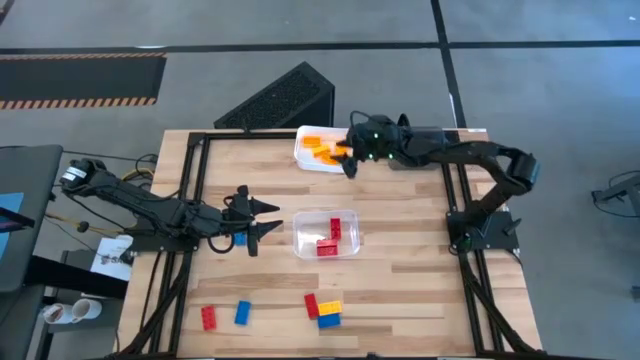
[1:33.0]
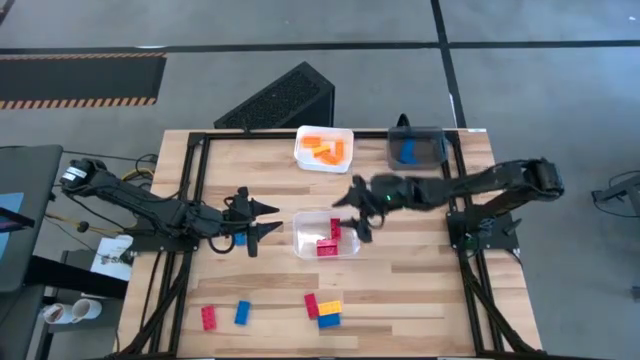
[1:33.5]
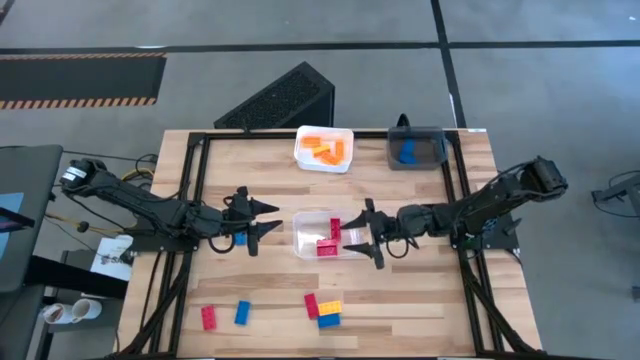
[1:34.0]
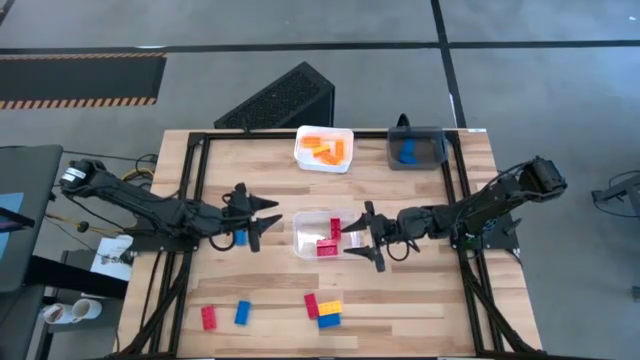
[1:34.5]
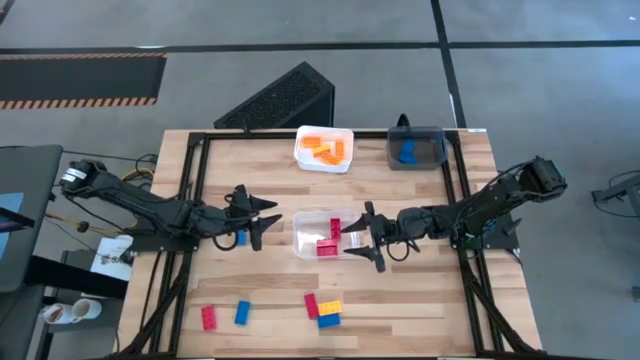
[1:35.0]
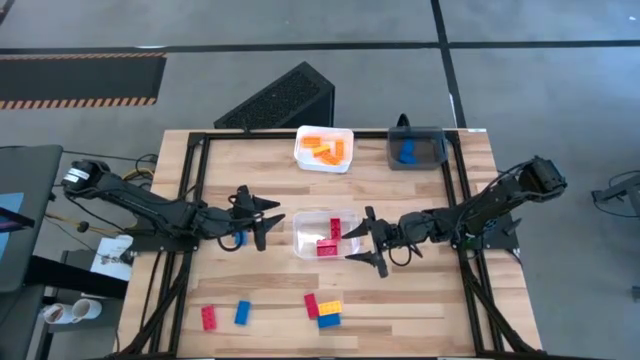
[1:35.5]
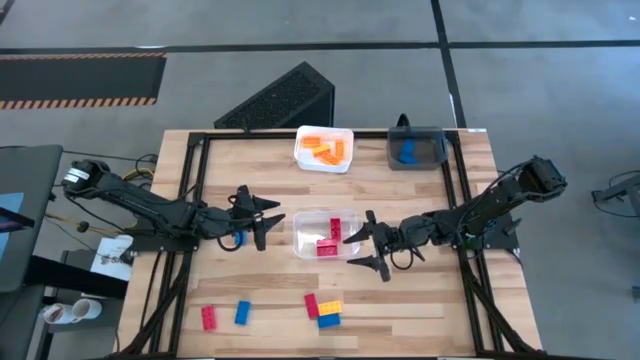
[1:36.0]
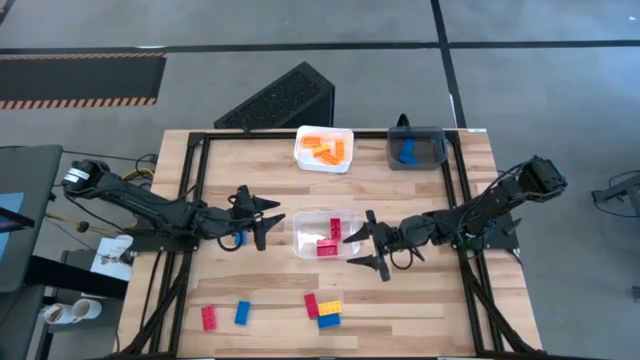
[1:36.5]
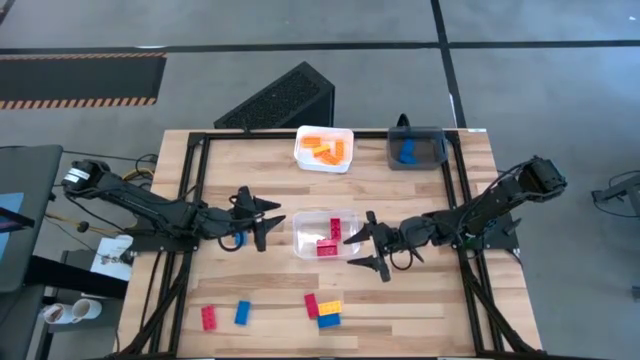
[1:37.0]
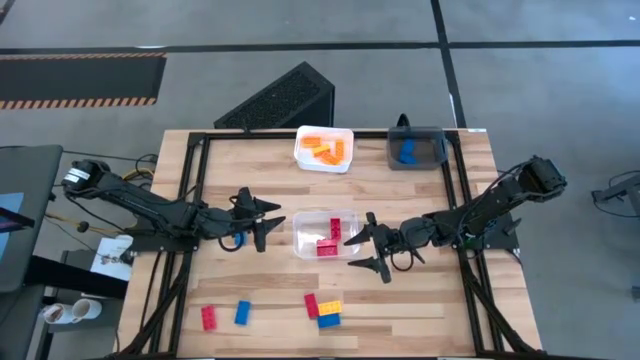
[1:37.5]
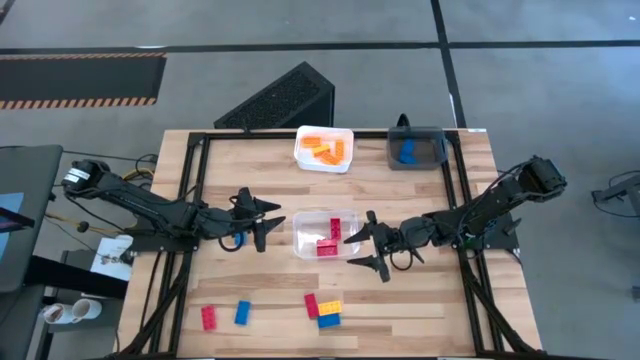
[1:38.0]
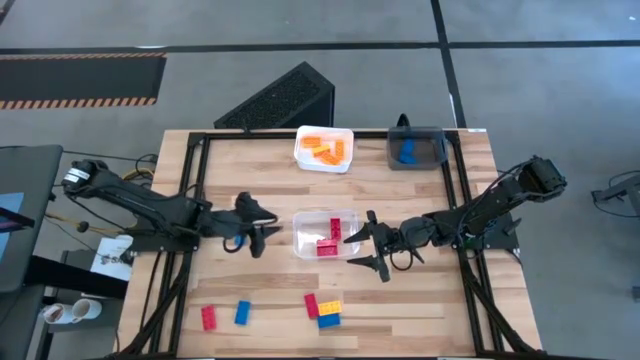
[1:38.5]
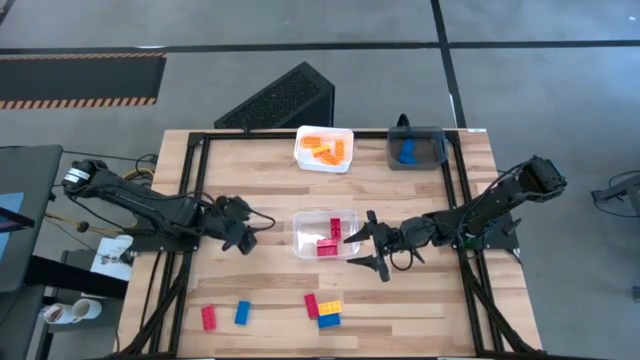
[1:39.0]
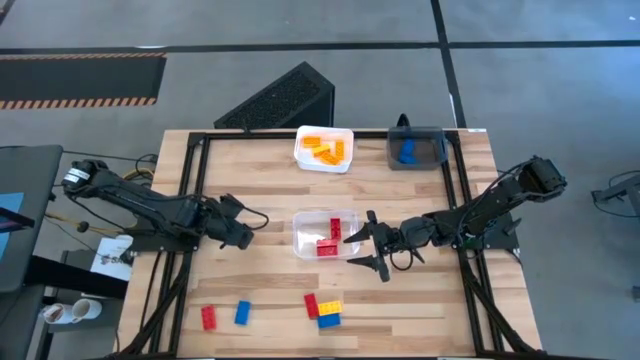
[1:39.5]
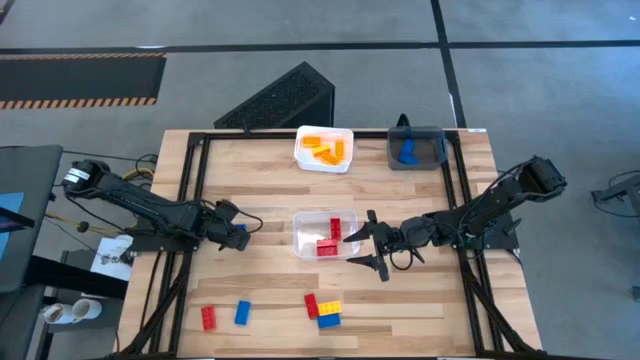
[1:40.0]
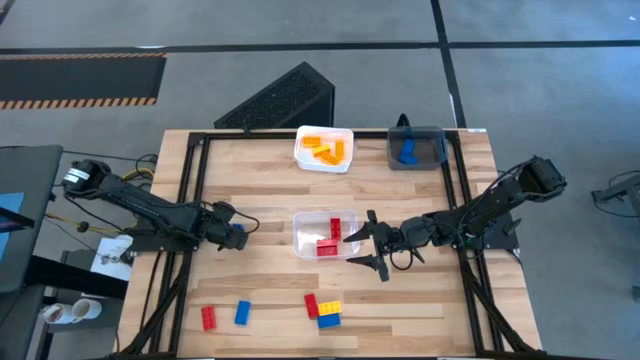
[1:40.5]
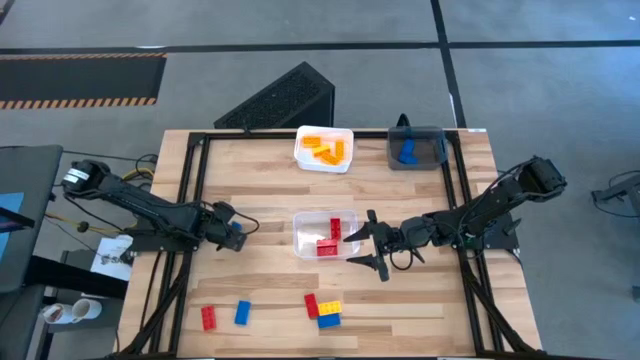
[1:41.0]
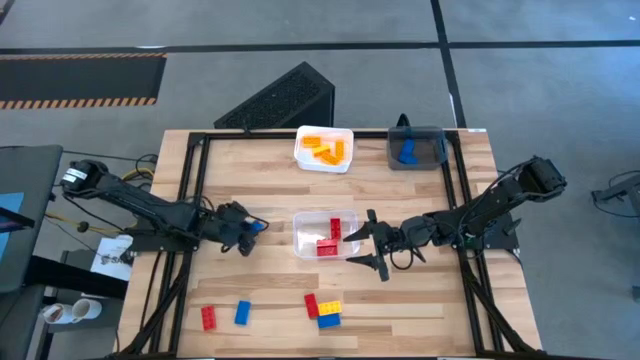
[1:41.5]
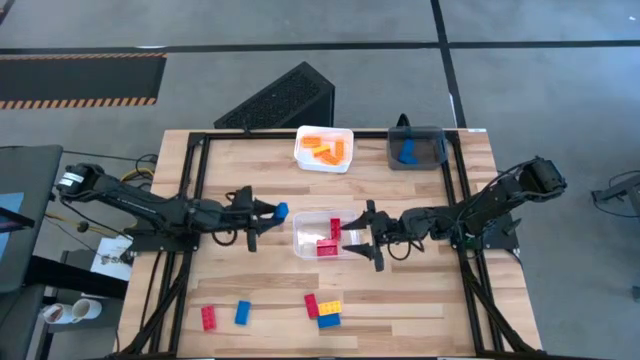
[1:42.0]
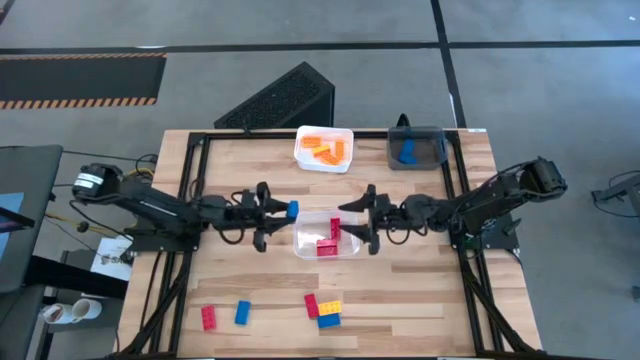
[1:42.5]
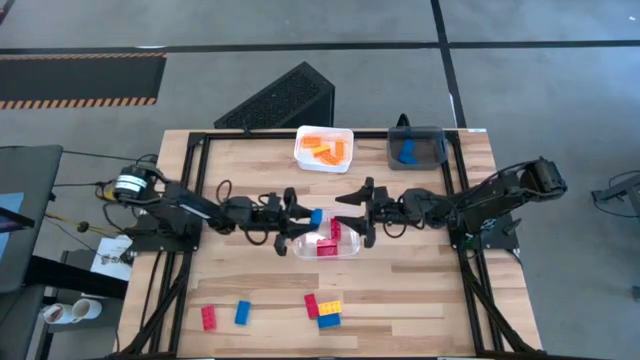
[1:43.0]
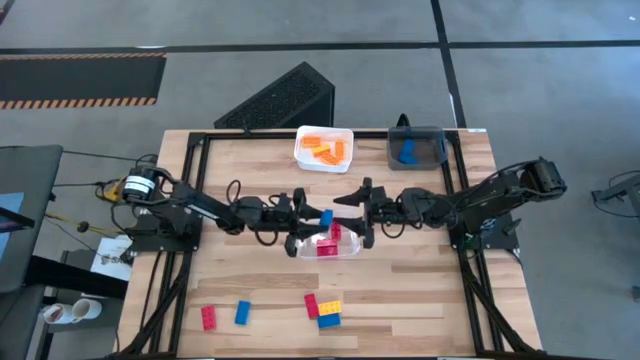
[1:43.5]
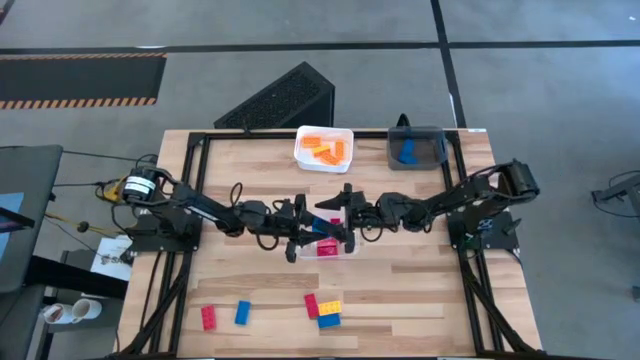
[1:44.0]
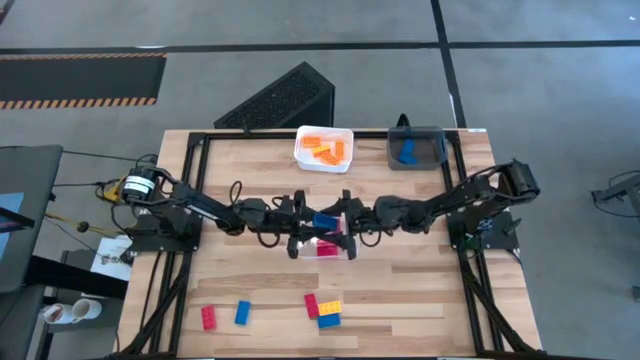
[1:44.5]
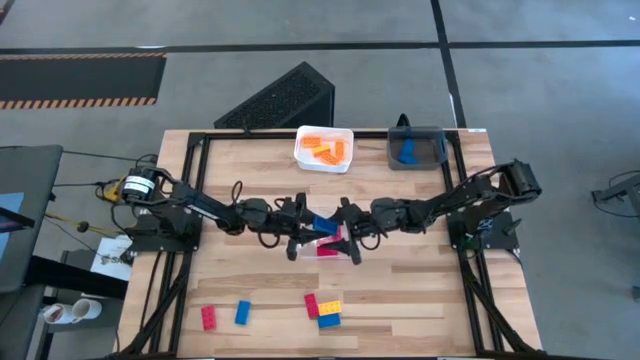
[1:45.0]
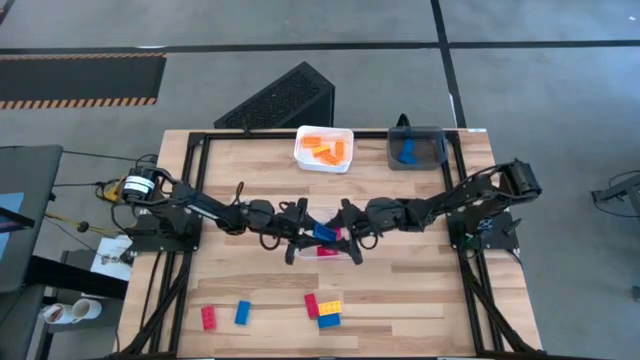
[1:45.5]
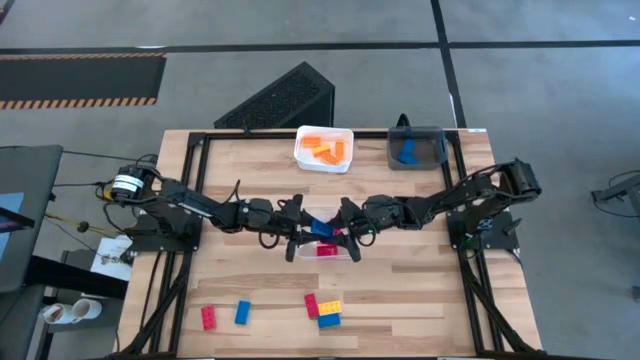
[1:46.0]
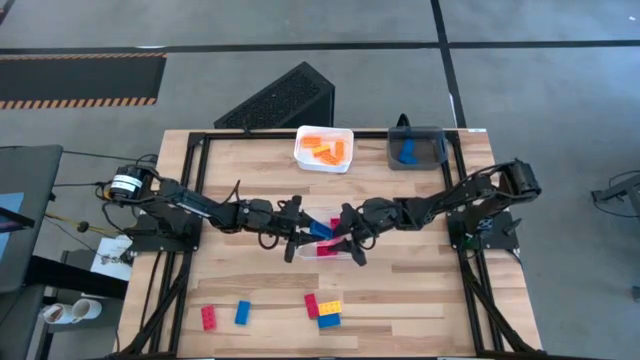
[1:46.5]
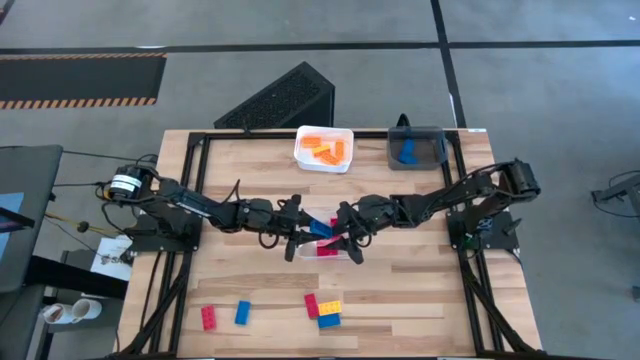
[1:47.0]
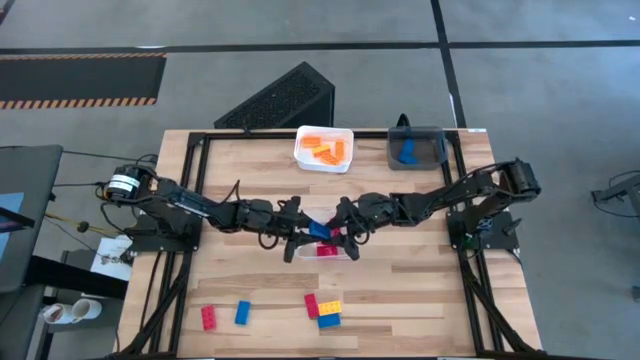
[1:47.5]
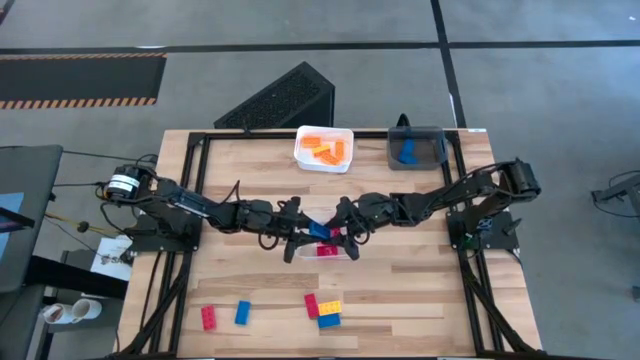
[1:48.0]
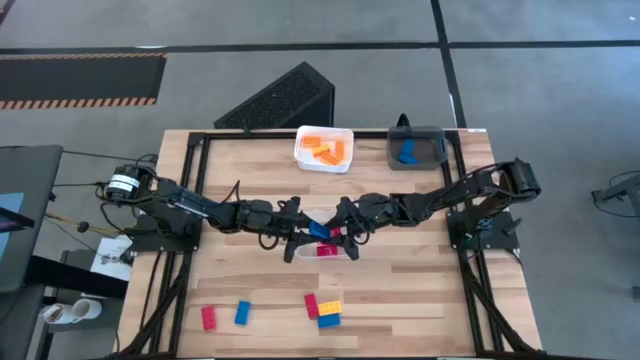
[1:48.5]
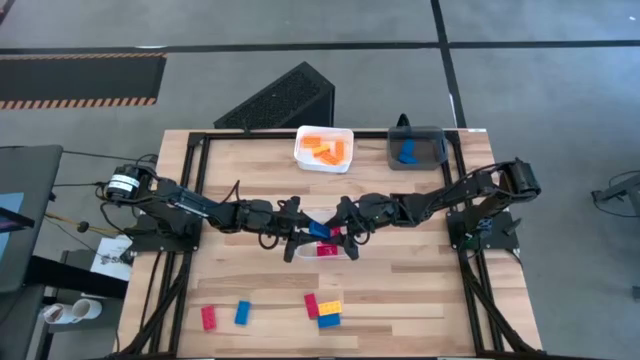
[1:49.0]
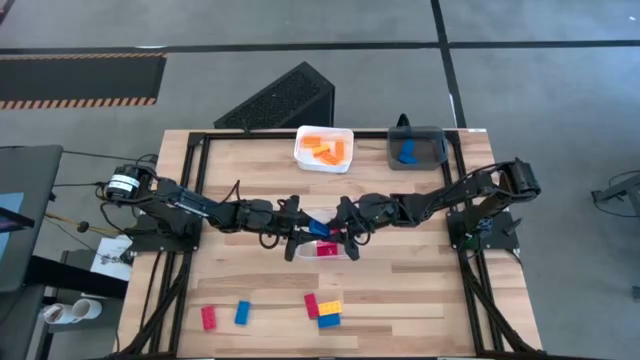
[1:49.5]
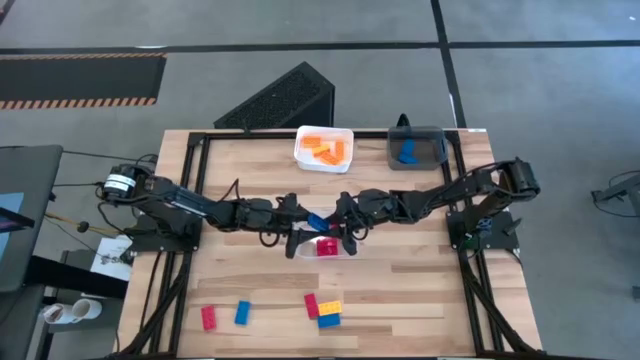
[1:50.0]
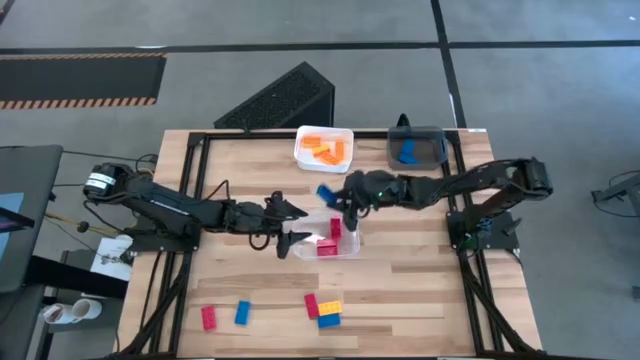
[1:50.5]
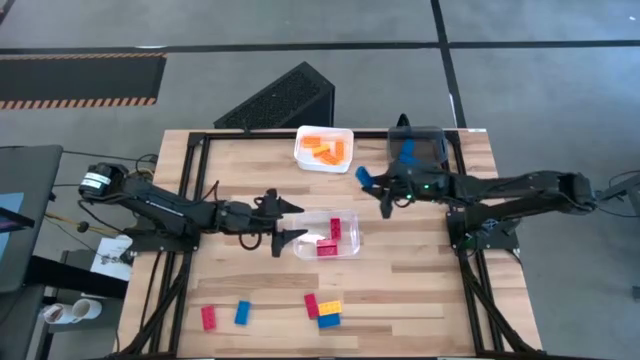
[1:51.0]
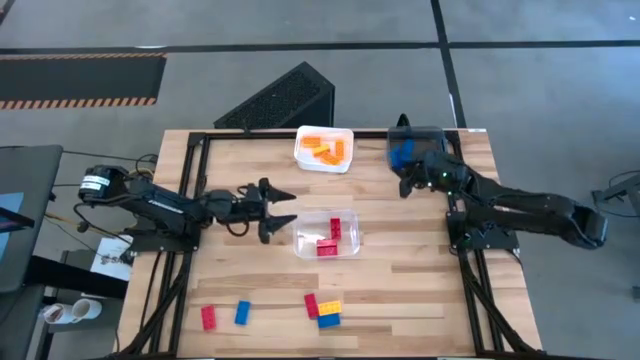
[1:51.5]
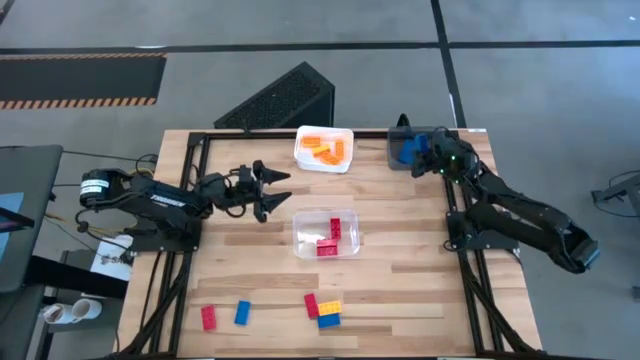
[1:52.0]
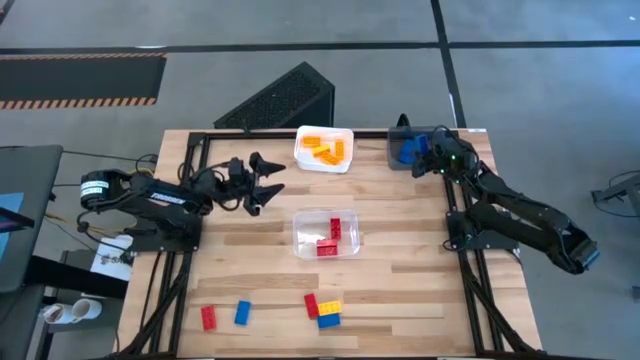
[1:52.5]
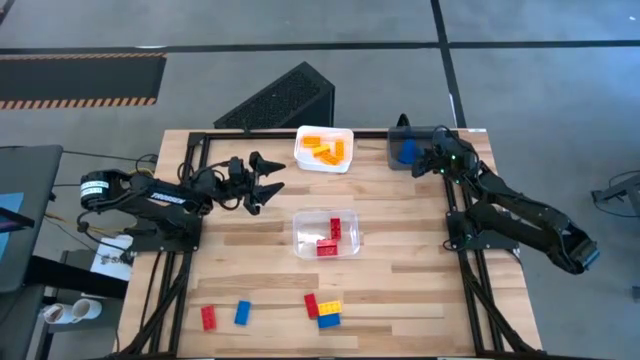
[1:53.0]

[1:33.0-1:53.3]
Task: Sort & place blocks by color
Put the blue game piece into the black bin

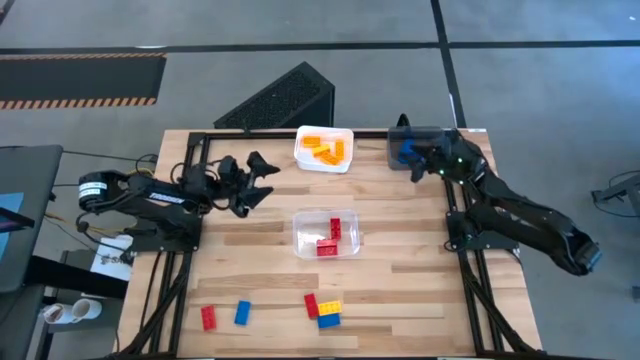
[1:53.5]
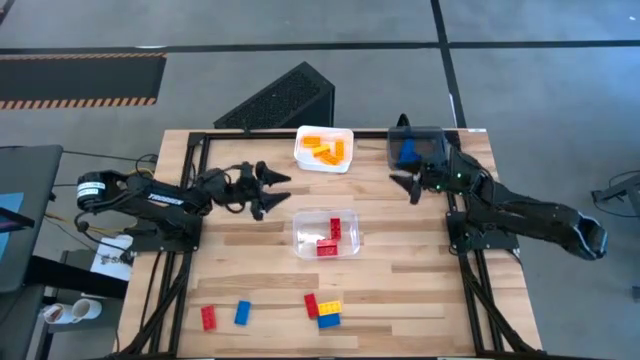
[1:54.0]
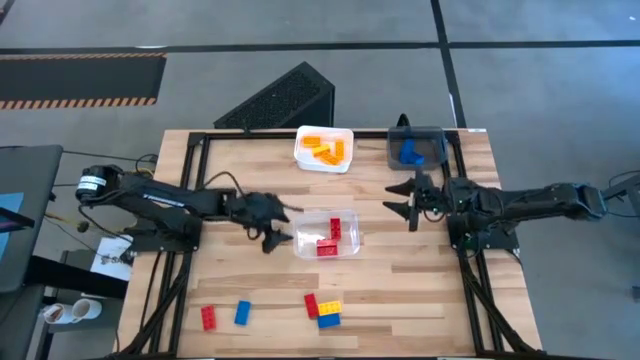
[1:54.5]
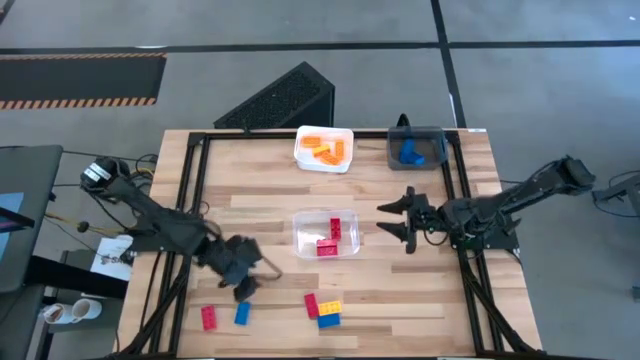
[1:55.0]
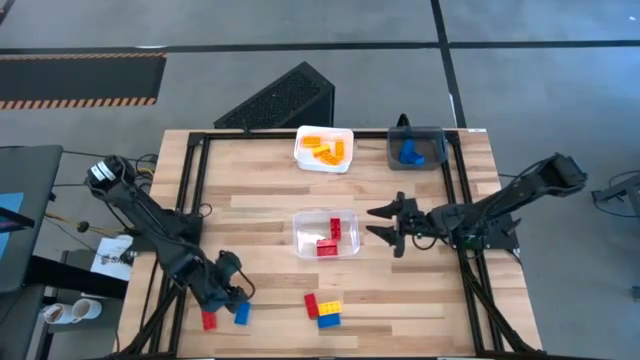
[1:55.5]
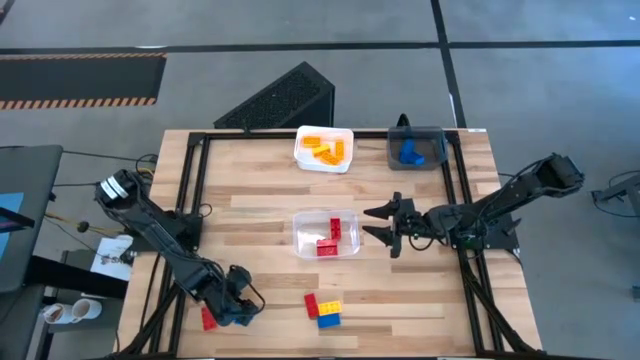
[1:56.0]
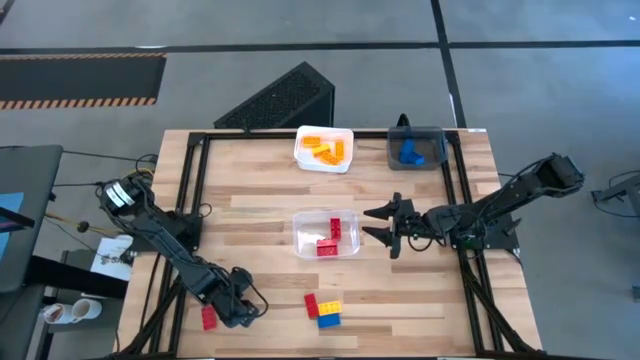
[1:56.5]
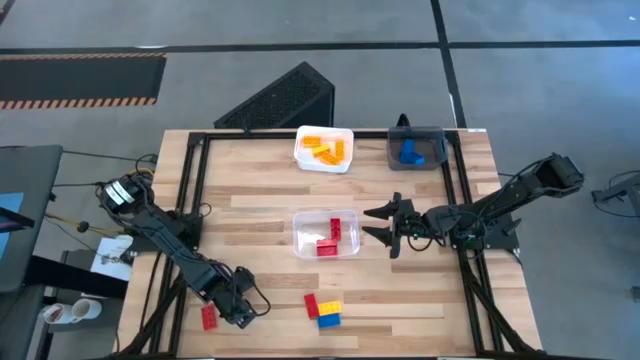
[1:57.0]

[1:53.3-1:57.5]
Put the red game piece into the transparent bin
